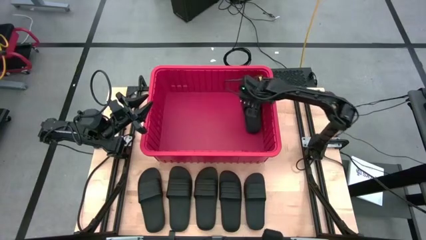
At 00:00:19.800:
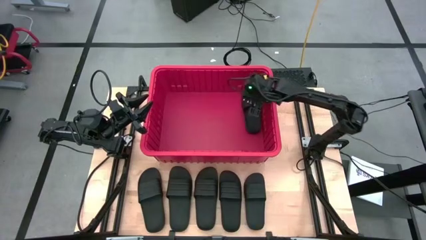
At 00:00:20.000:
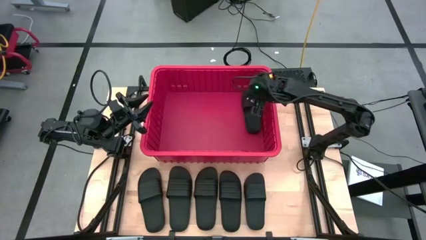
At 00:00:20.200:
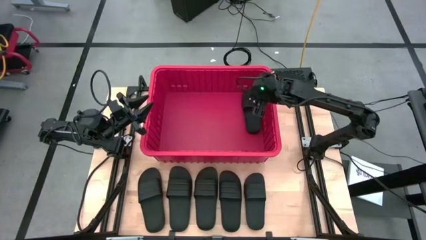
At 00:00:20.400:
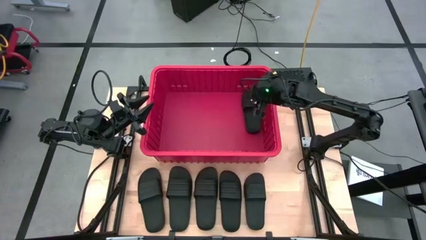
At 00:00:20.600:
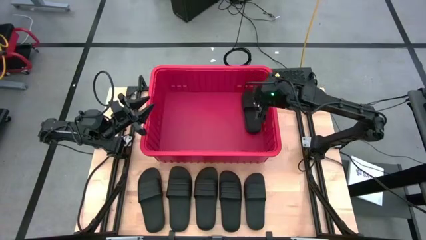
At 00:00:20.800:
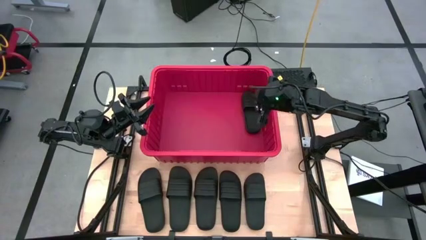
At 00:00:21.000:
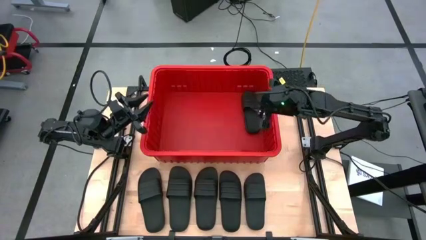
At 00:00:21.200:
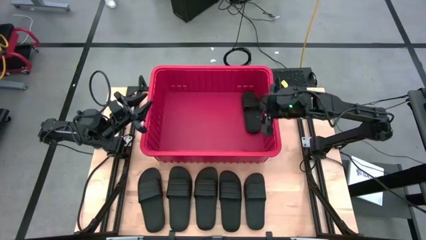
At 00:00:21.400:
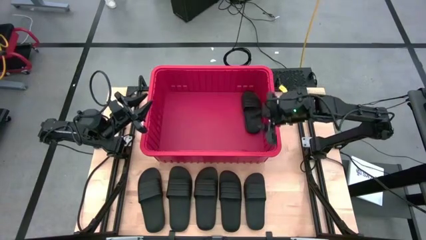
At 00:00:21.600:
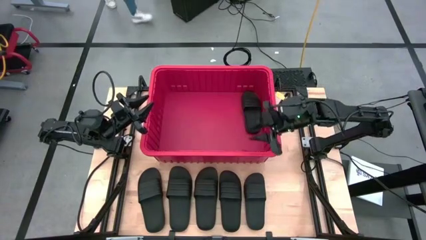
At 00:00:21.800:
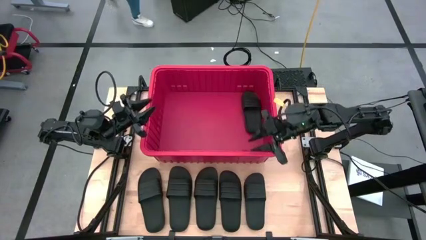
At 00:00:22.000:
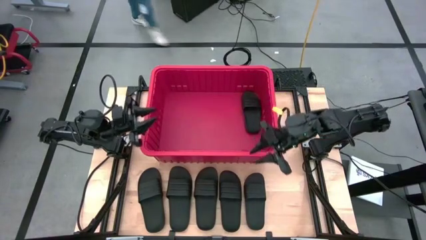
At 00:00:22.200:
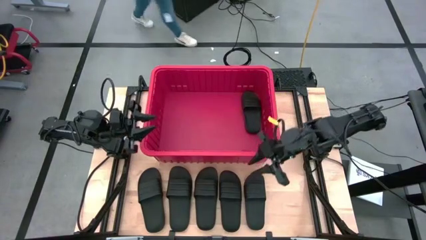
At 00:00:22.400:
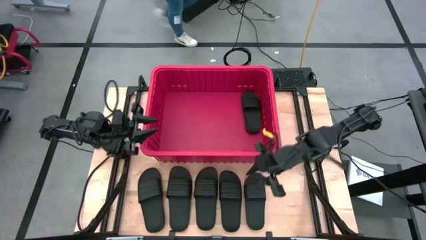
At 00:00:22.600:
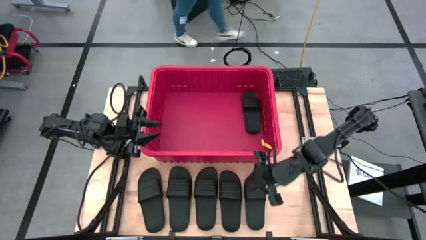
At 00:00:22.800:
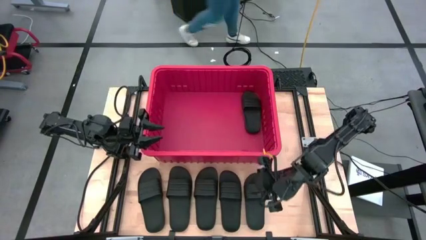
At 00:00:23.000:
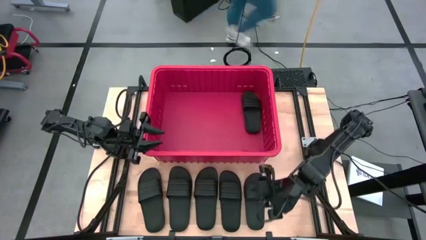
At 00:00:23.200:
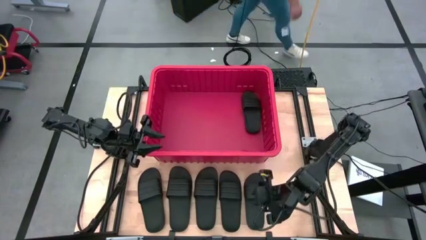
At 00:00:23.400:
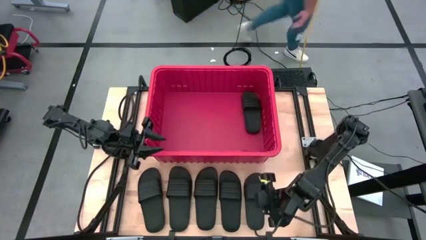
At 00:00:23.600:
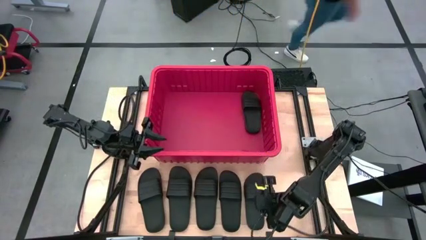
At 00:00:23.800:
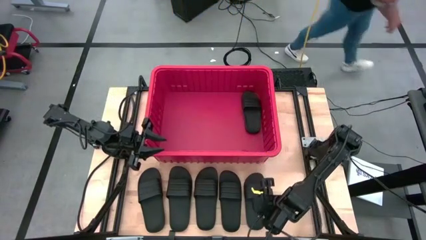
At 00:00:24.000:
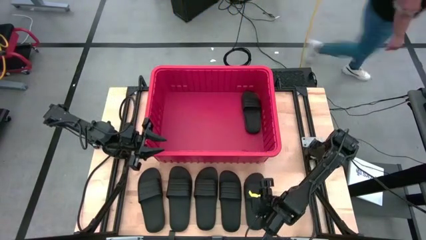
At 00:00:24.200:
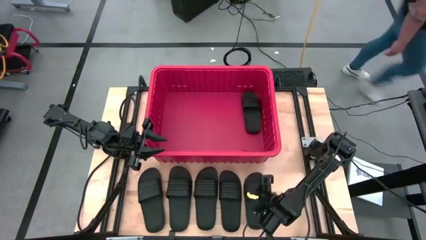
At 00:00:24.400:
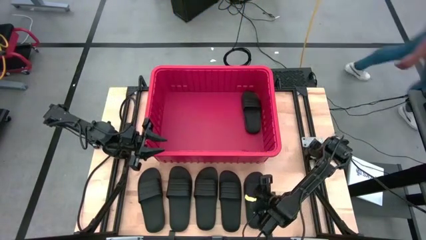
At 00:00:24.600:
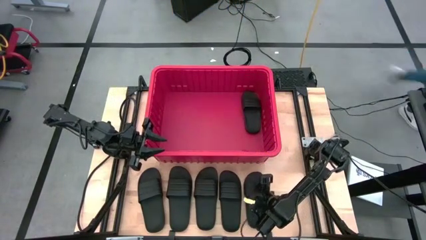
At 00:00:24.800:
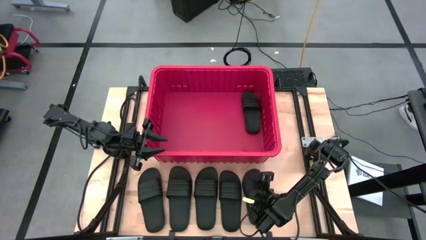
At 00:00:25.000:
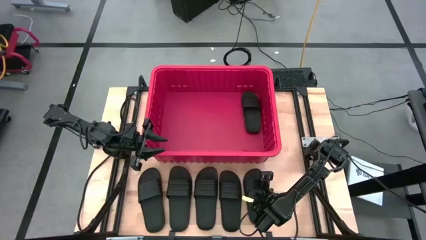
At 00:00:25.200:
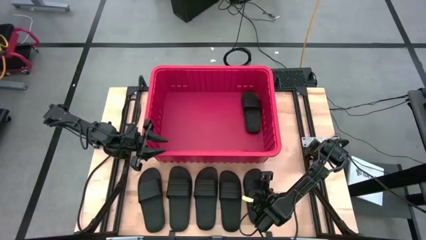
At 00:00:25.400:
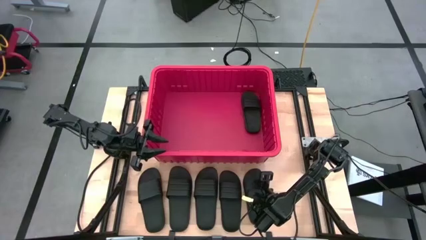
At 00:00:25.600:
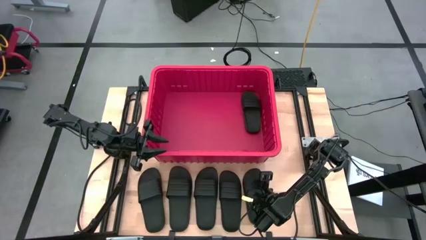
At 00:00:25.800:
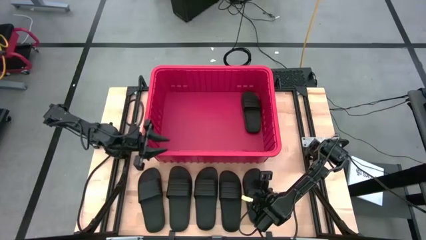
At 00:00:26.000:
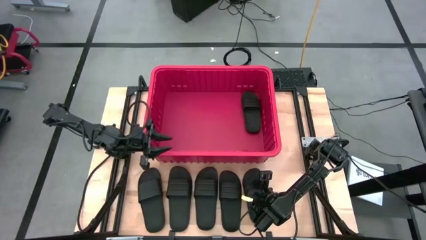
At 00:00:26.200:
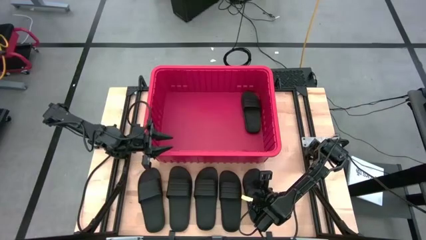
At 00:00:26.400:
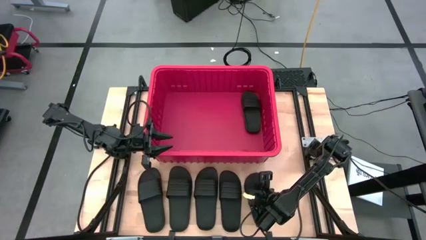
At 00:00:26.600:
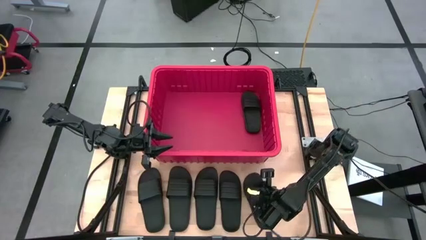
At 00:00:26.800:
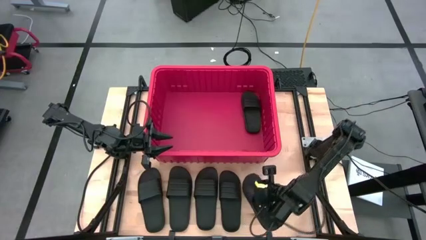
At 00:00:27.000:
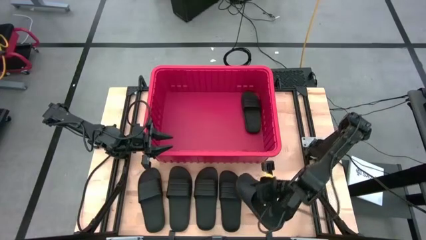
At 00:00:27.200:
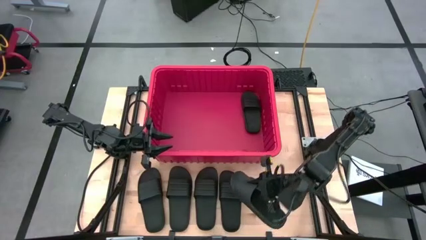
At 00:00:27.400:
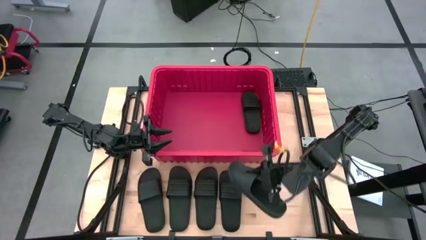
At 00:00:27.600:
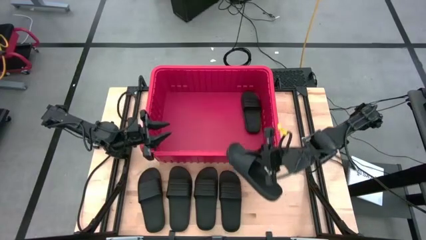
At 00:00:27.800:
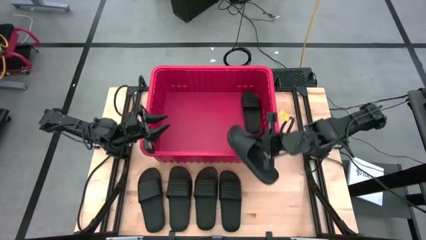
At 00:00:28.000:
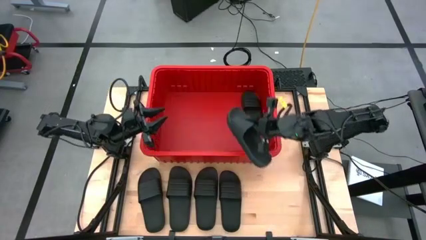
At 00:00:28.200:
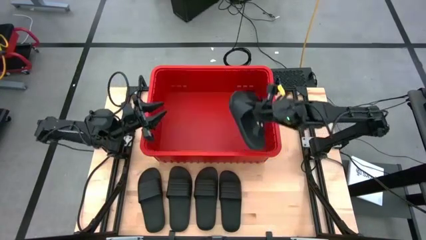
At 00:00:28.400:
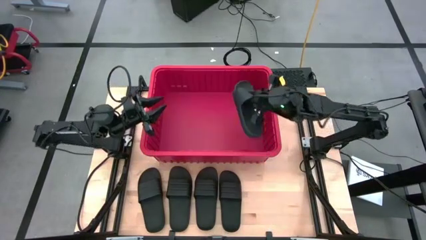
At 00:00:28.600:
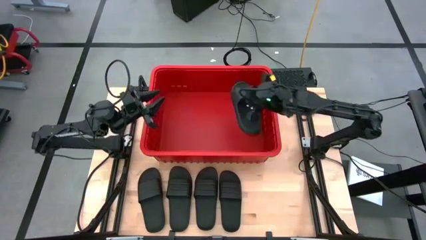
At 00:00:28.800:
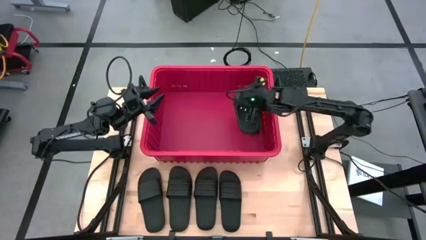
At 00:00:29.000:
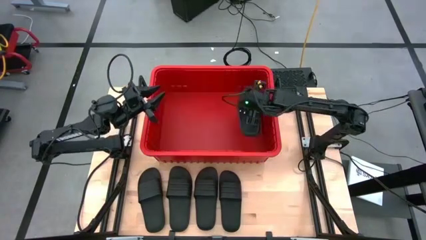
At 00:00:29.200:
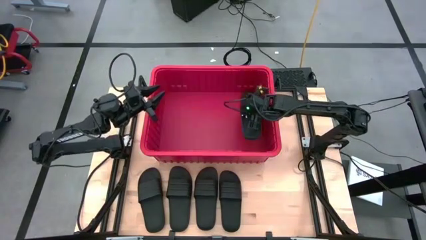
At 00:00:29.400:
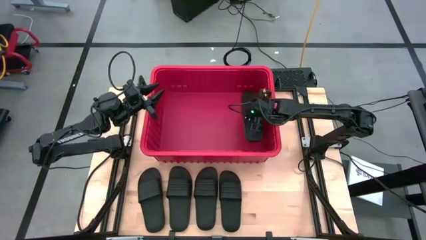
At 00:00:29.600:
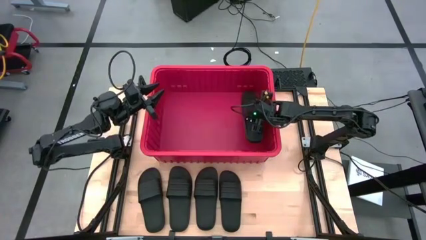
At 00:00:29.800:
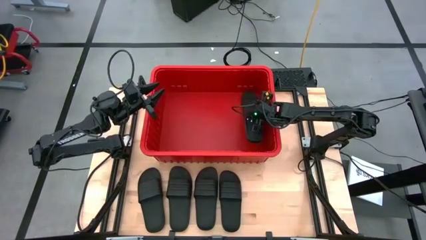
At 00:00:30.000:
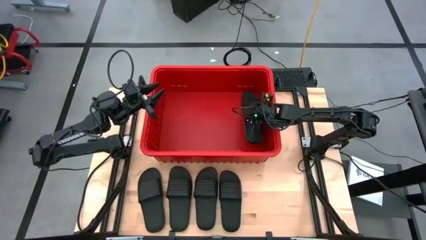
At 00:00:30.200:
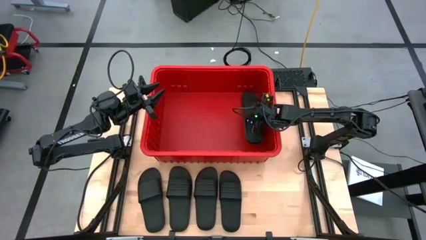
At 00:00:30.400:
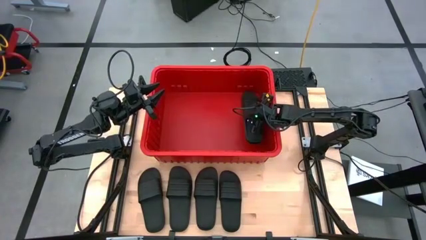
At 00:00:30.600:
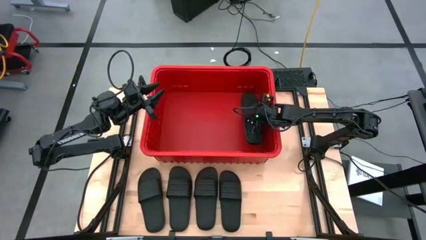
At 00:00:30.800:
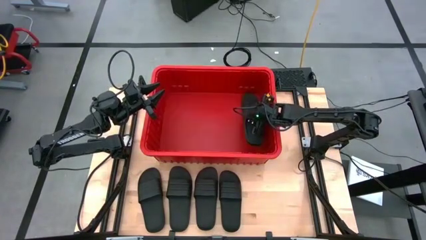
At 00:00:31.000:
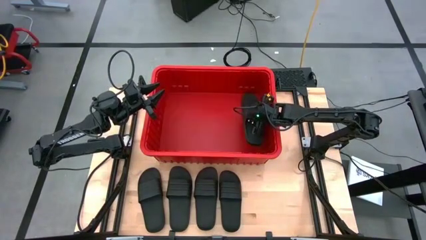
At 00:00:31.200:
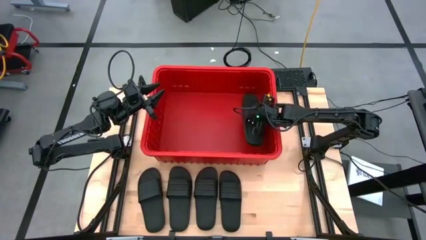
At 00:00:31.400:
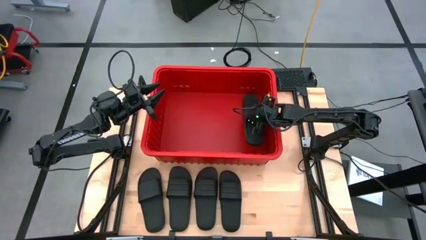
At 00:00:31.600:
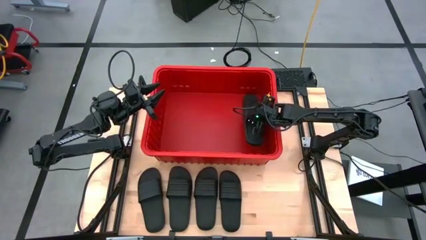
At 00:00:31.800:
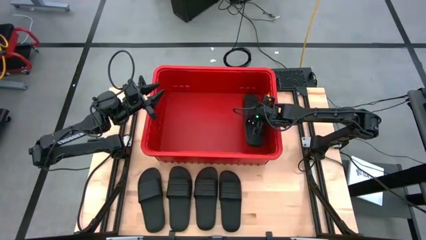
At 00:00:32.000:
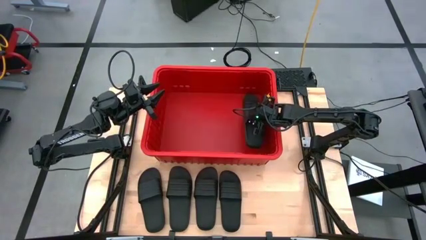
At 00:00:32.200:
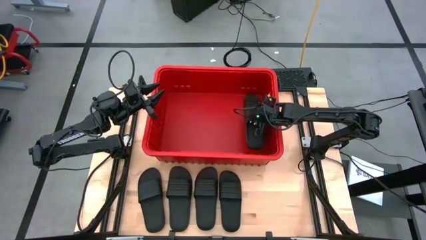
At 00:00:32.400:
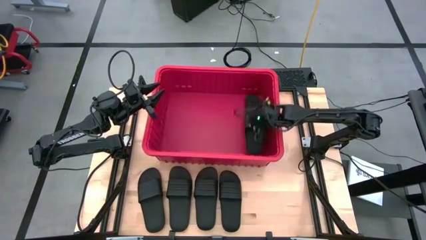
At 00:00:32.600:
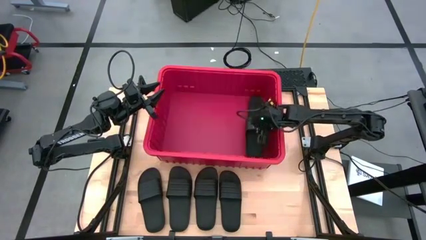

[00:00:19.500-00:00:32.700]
Task: Pick and place slides into bin
Put the black slide into the red bin

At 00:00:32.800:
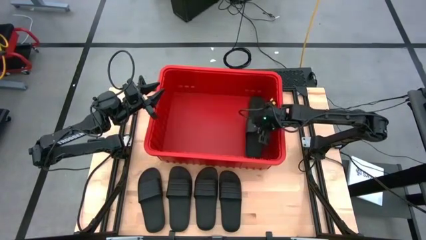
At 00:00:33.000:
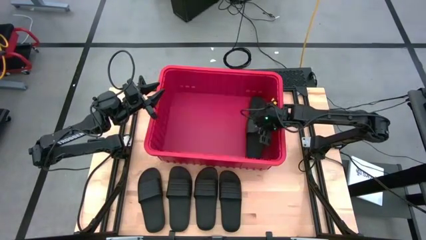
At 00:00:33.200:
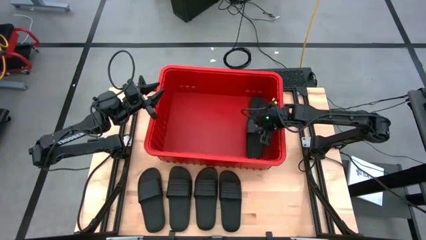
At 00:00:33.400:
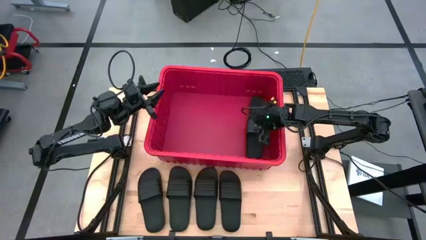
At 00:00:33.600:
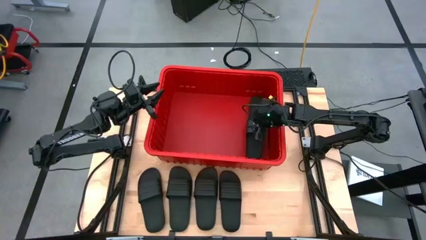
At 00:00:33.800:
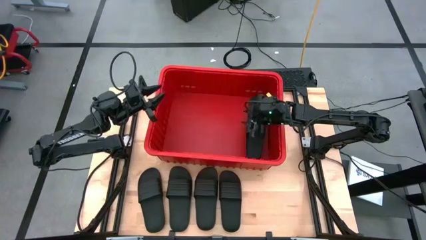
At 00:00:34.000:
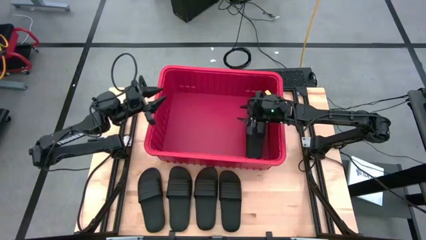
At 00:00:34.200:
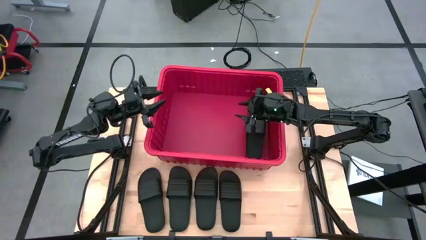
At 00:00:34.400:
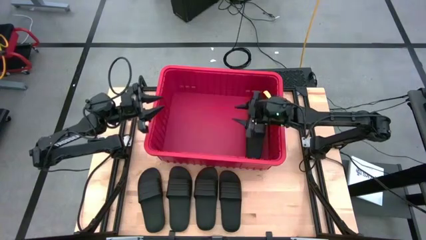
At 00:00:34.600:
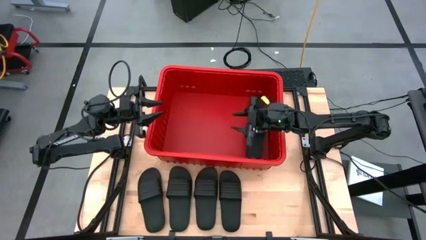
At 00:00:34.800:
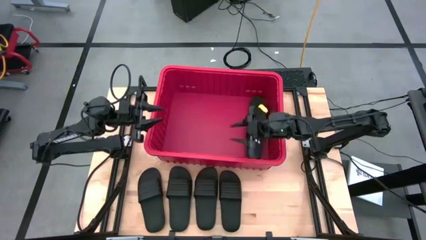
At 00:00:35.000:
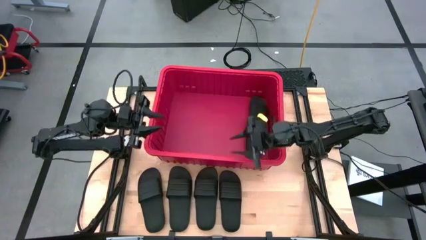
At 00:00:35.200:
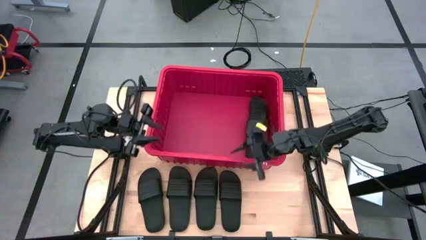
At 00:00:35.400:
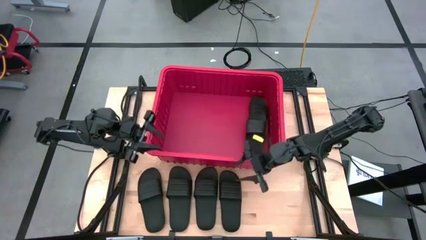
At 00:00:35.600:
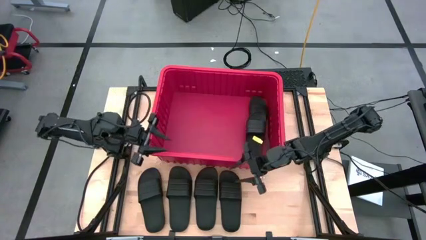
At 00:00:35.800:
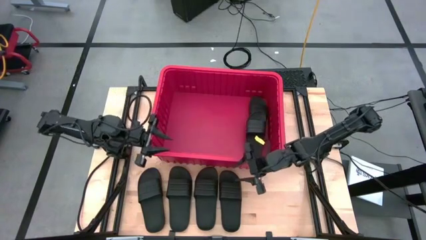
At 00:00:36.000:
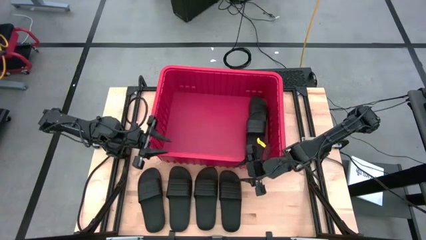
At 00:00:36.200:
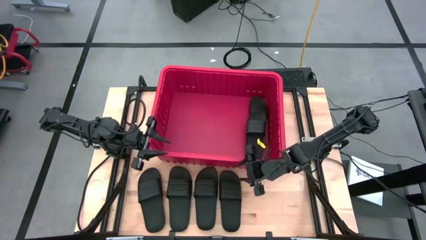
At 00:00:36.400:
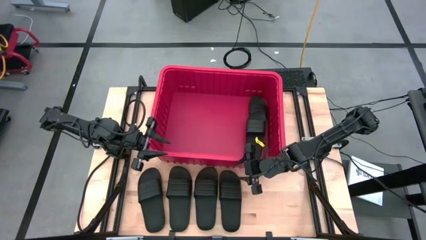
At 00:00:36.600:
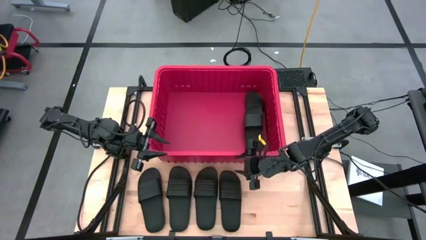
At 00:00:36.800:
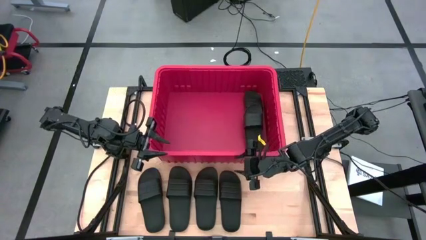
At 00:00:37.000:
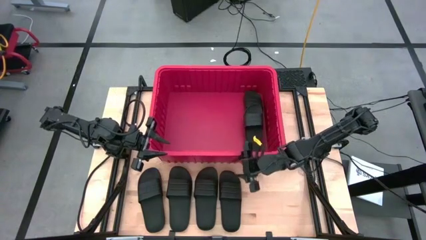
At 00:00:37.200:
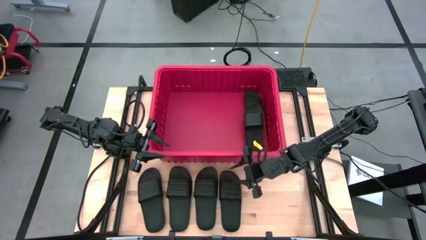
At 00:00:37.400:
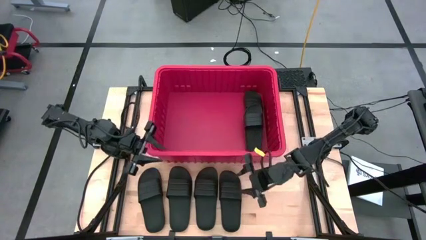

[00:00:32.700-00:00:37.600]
Adjust the red bin
